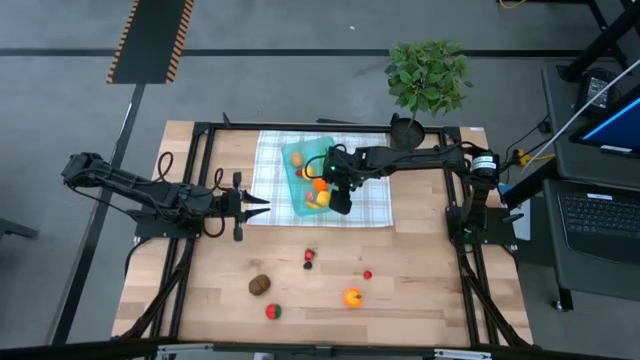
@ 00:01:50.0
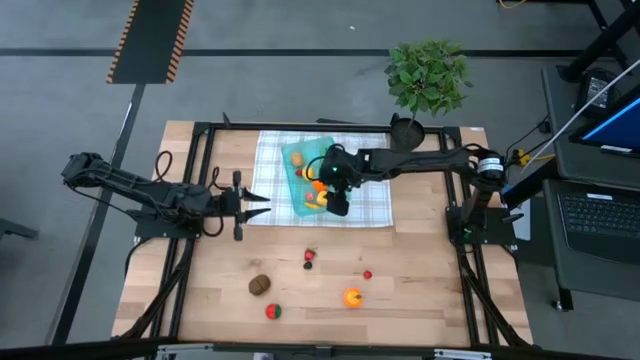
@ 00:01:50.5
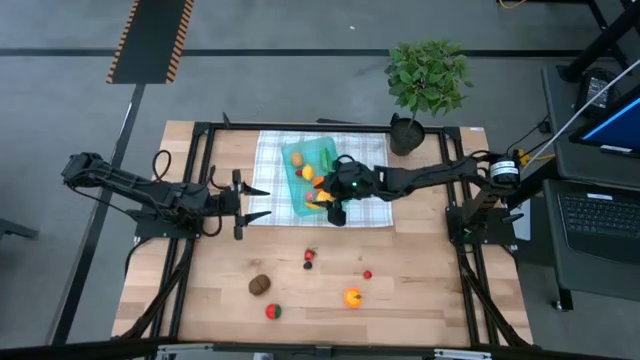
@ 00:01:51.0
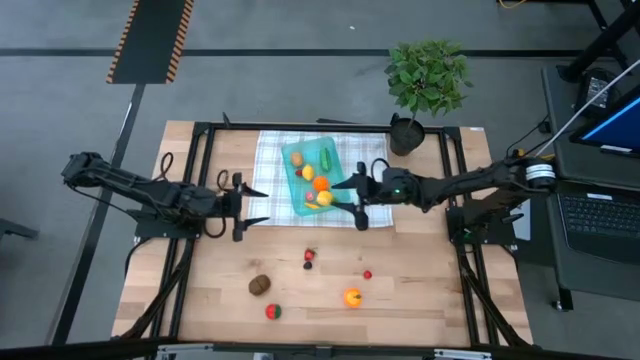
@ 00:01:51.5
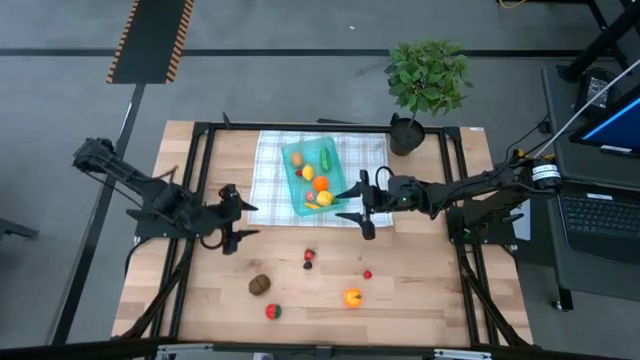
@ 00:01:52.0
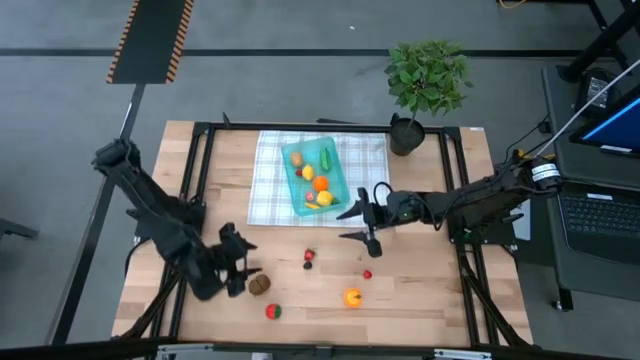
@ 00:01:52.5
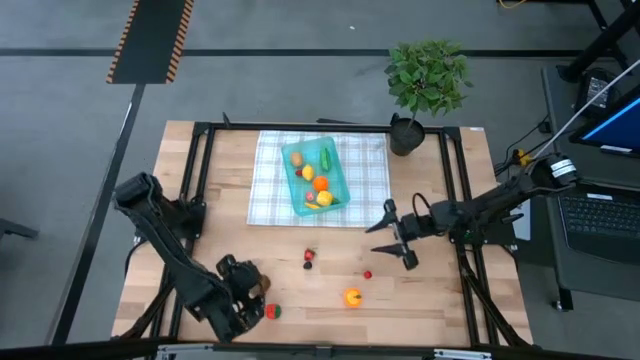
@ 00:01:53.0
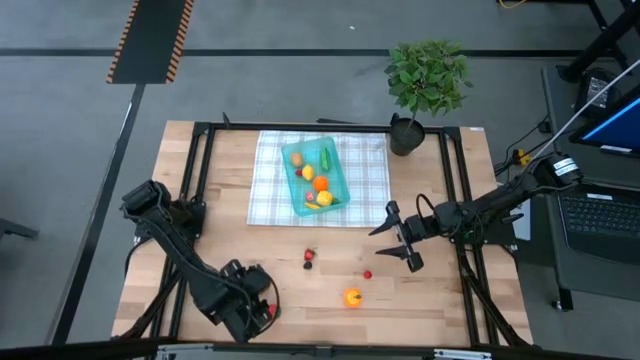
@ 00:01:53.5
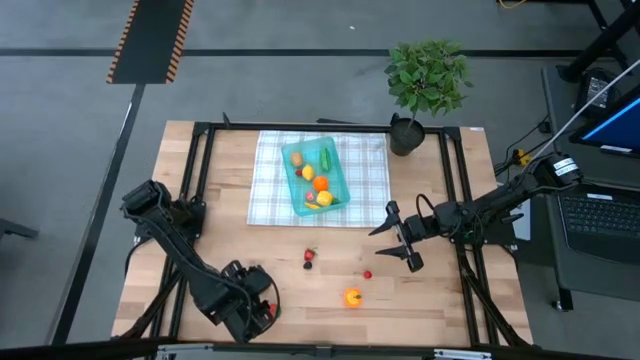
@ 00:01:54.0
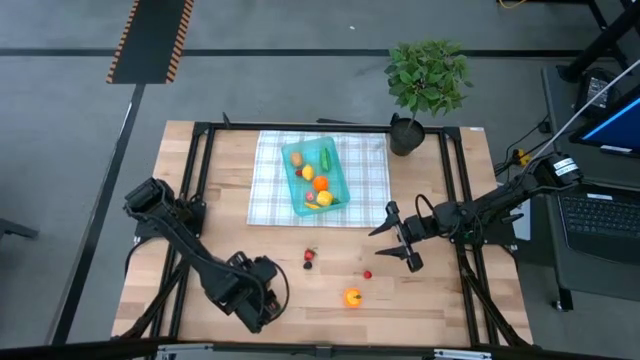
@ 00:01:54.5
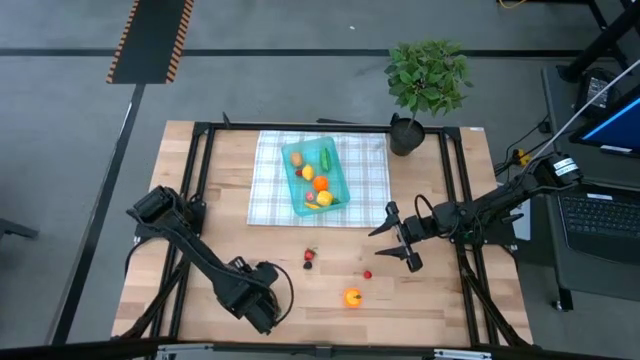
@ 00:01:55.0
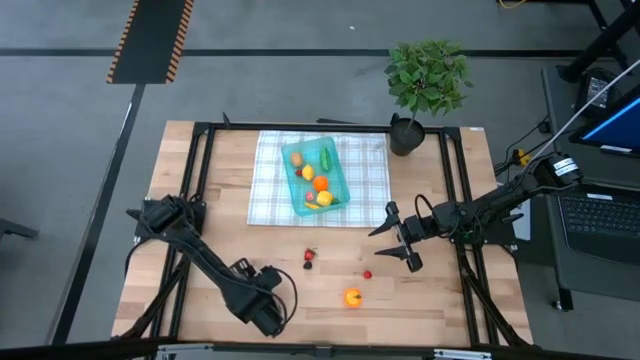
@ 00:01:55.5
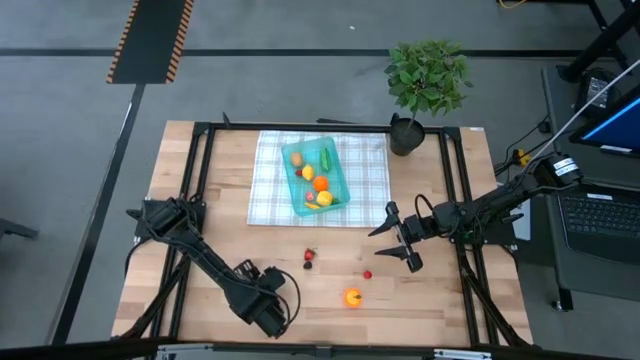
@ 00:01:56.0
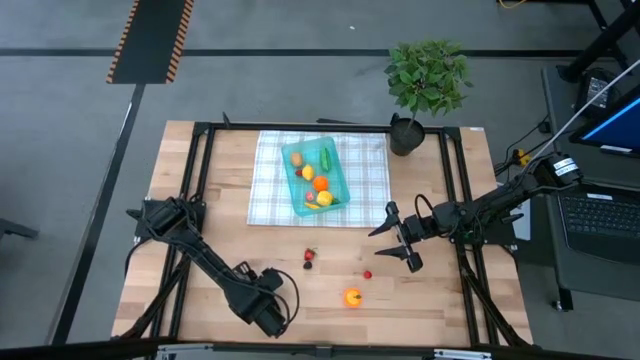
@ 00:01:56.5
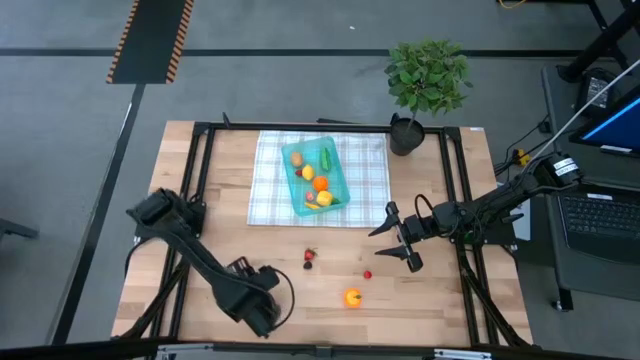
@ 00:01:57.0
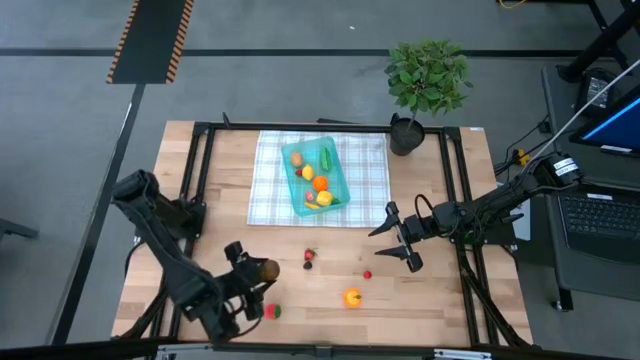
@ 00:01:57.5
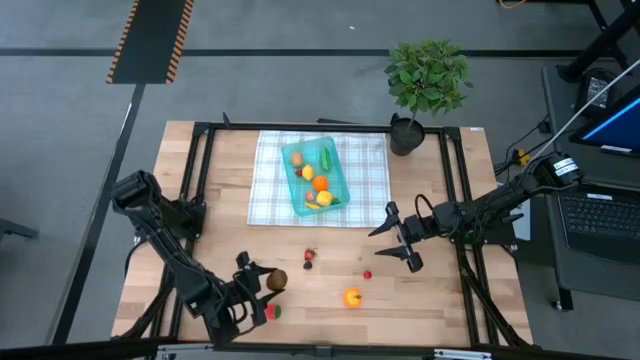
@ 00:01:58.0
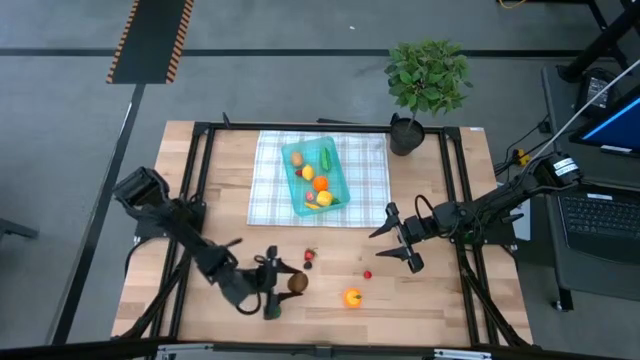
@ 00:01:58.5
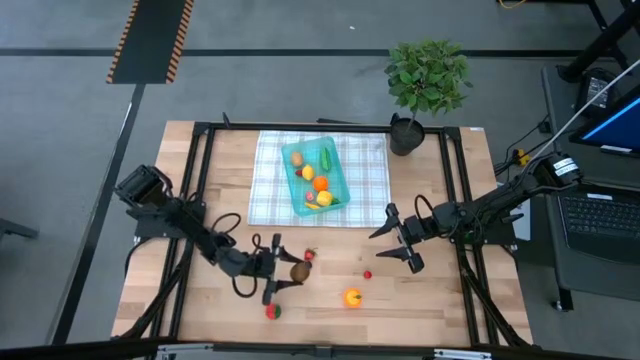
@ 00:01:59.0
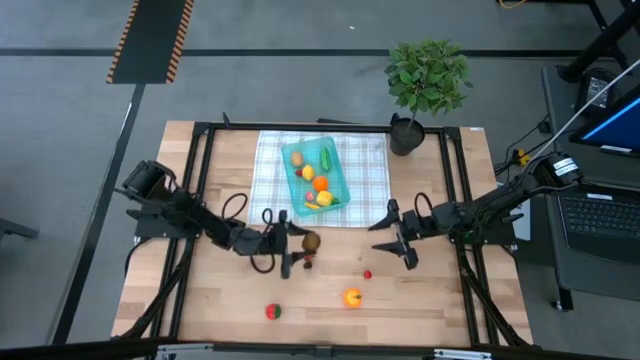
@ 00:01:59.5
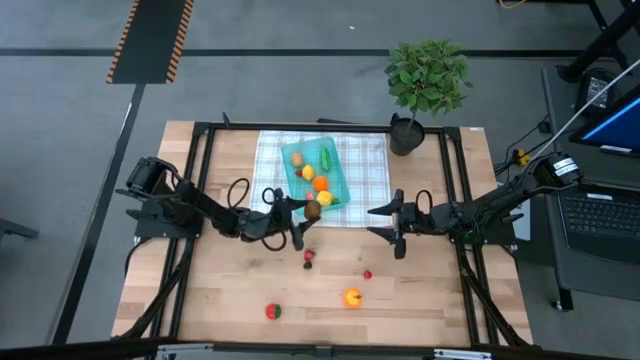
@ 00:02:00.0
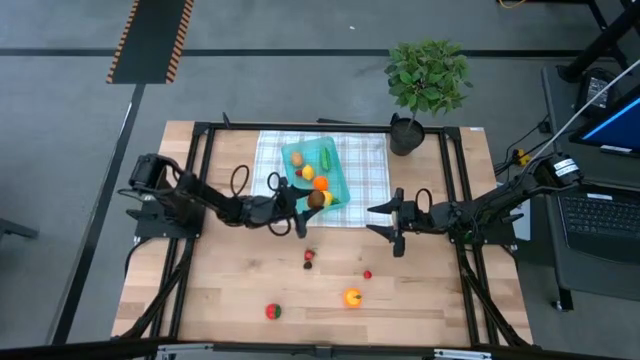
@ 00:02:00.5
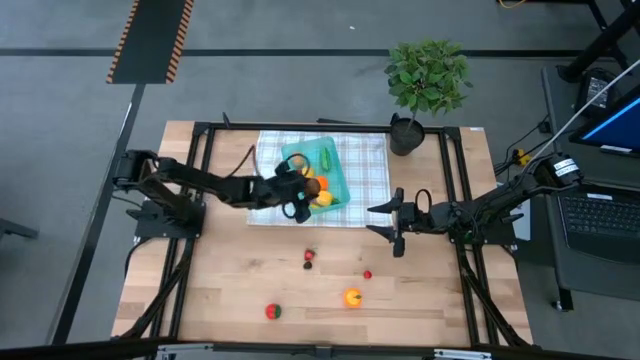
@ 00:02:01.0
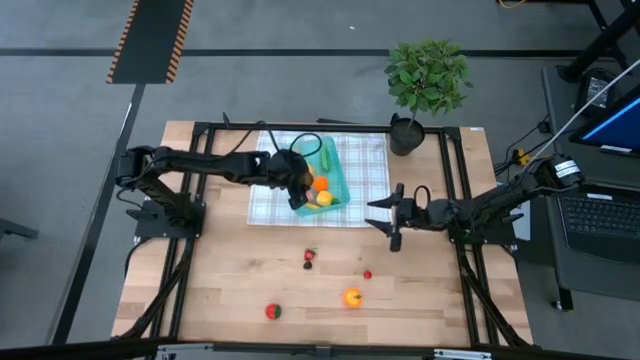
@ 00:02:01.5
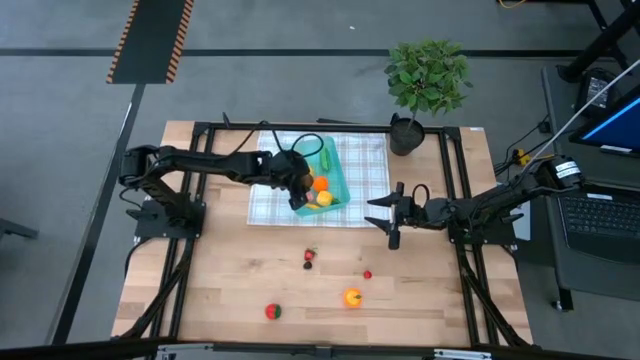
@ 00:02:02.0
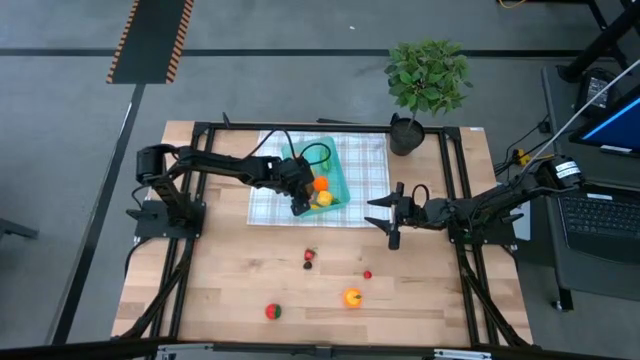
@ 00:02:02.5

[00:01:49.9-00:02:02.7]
Task: Pick and placing Produce into tupperware
Put the brown kiwi into the blue bin
